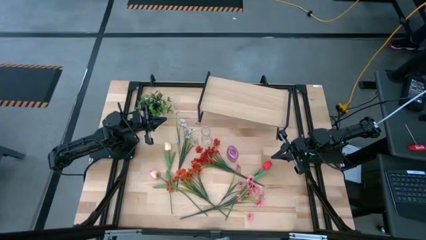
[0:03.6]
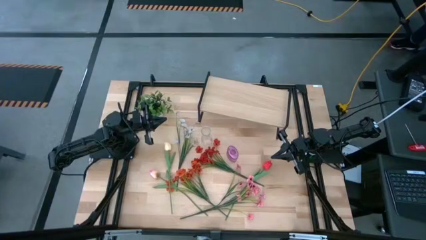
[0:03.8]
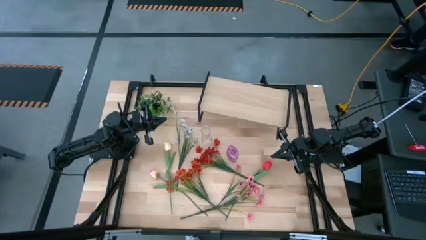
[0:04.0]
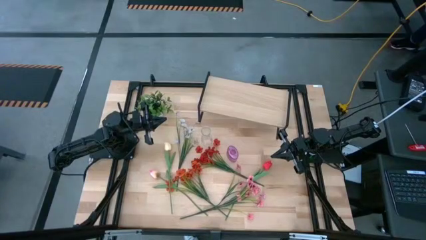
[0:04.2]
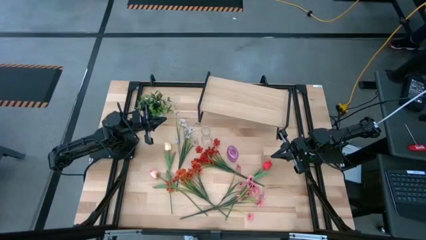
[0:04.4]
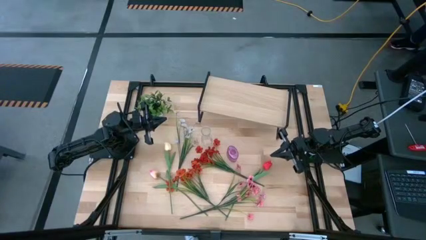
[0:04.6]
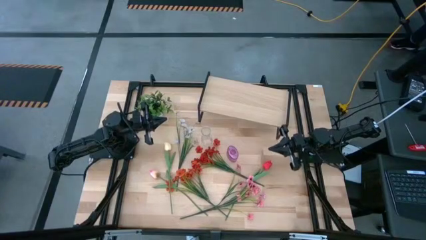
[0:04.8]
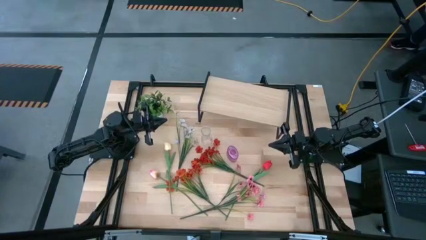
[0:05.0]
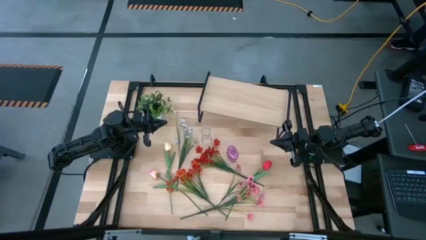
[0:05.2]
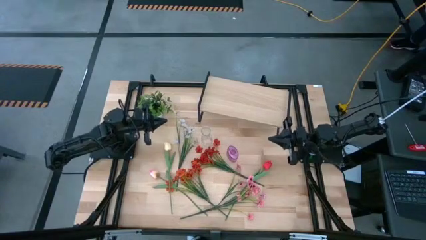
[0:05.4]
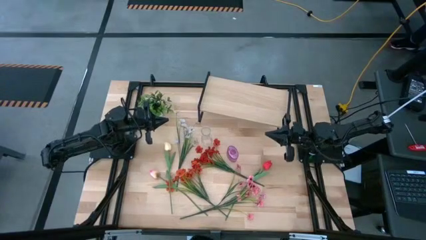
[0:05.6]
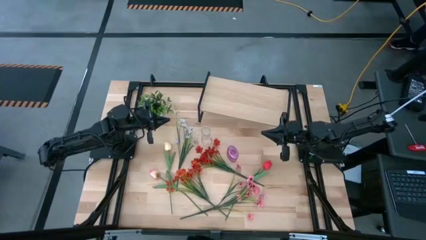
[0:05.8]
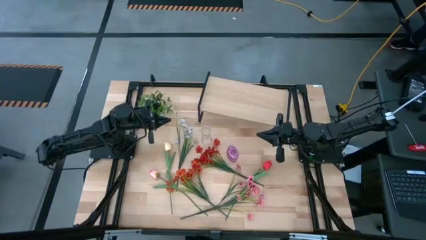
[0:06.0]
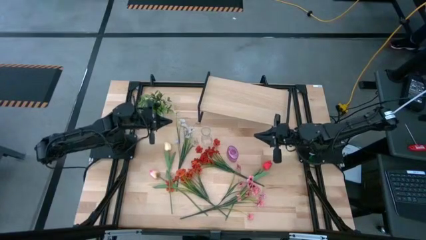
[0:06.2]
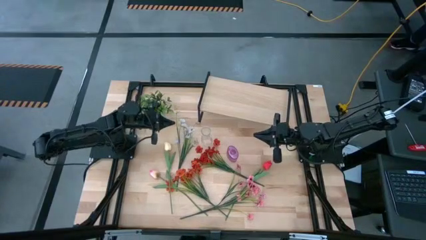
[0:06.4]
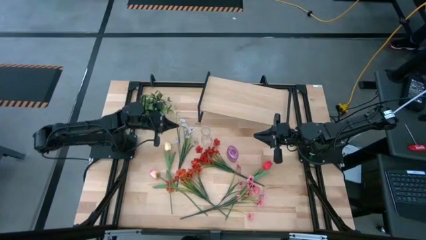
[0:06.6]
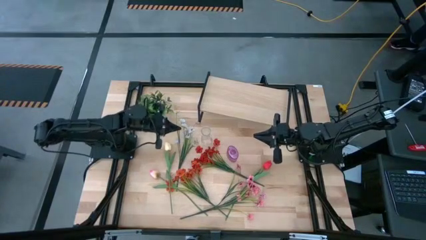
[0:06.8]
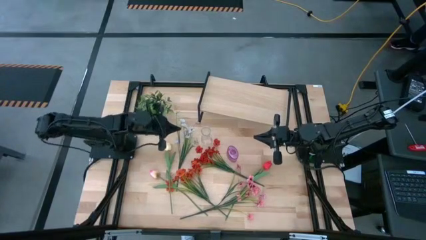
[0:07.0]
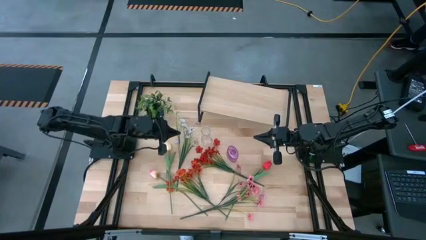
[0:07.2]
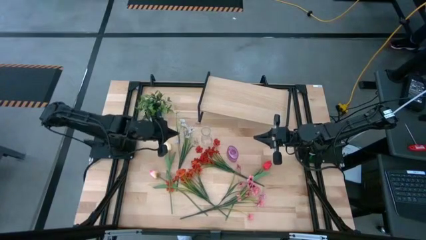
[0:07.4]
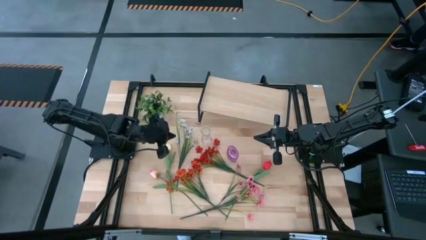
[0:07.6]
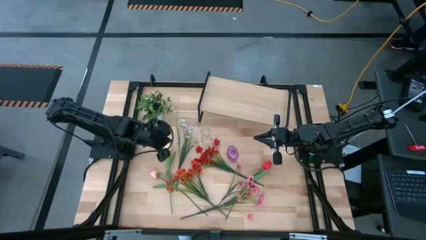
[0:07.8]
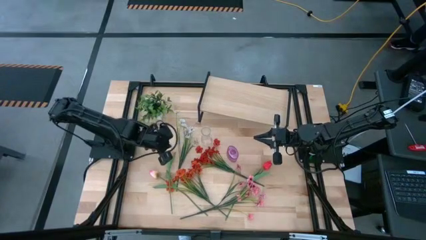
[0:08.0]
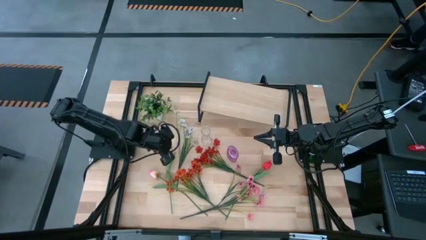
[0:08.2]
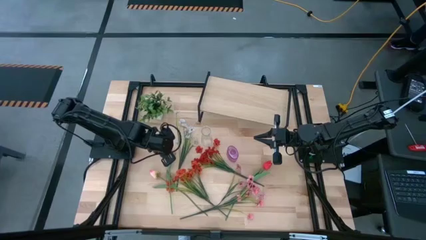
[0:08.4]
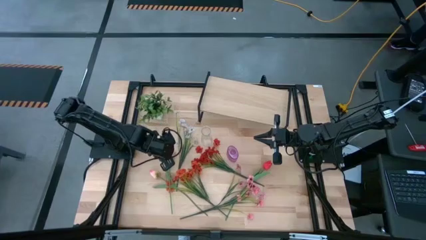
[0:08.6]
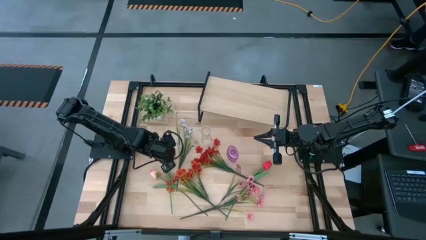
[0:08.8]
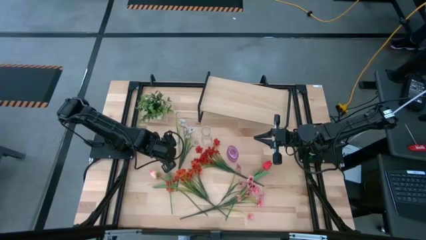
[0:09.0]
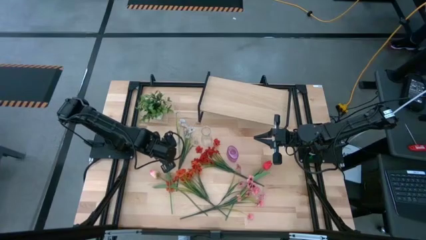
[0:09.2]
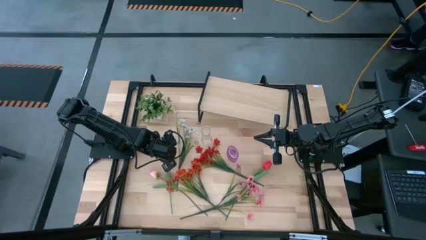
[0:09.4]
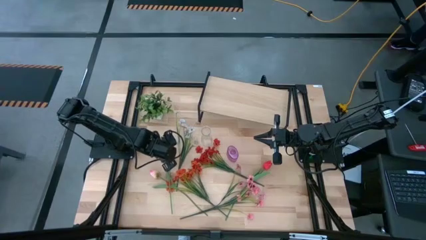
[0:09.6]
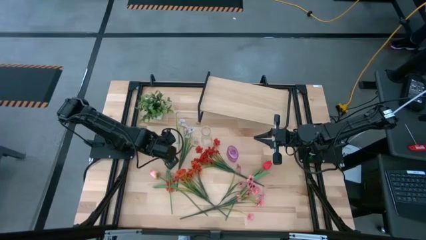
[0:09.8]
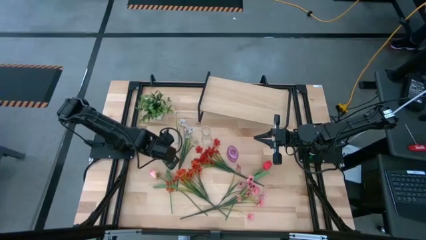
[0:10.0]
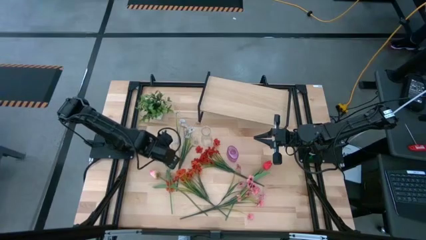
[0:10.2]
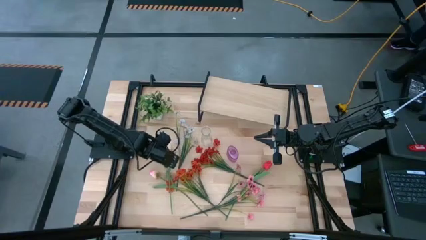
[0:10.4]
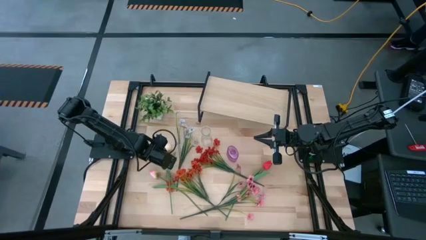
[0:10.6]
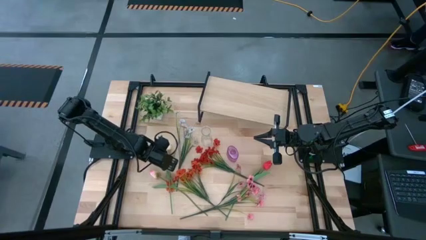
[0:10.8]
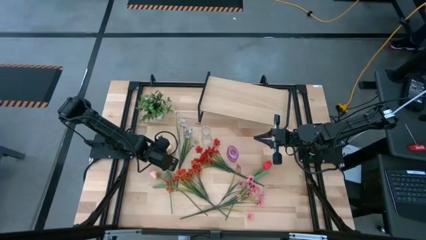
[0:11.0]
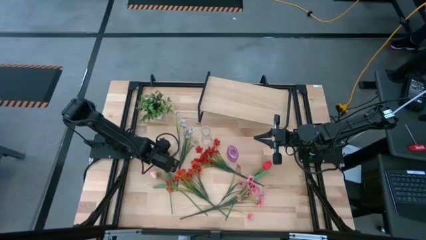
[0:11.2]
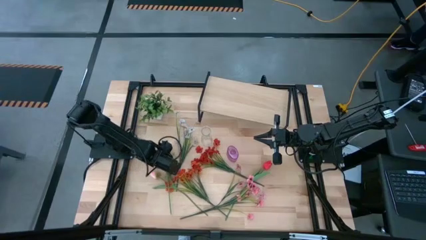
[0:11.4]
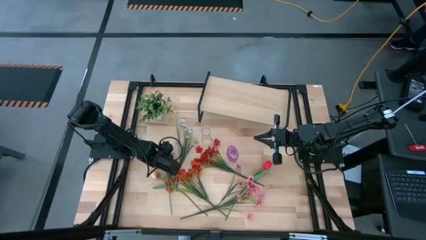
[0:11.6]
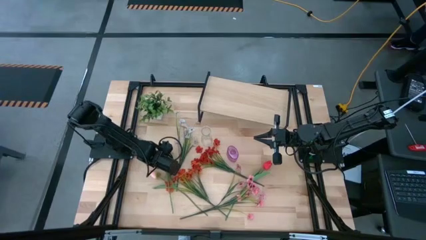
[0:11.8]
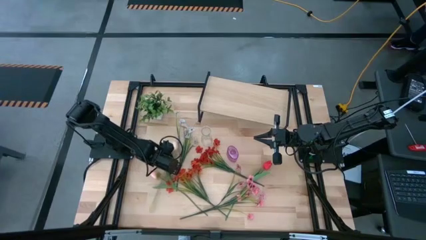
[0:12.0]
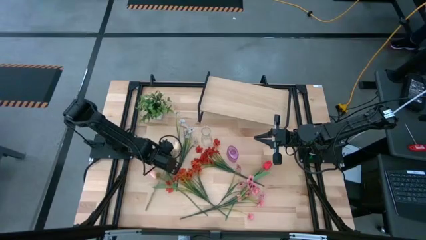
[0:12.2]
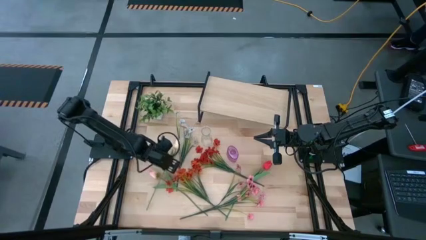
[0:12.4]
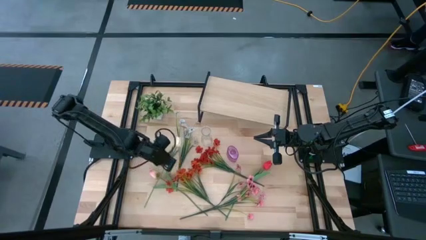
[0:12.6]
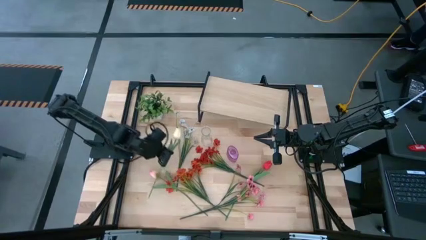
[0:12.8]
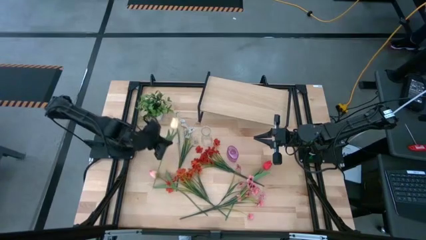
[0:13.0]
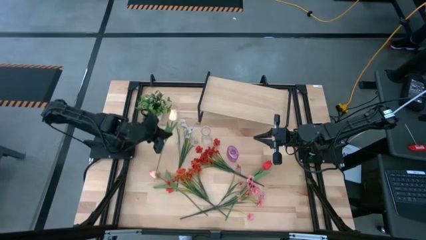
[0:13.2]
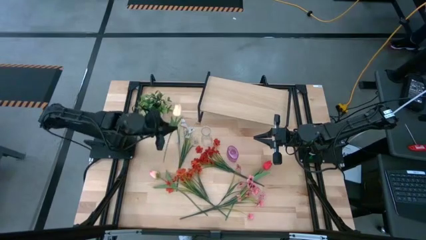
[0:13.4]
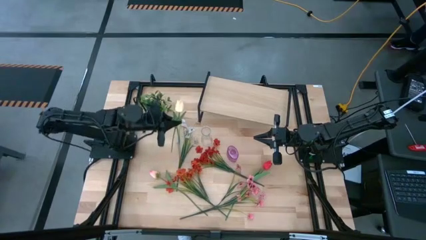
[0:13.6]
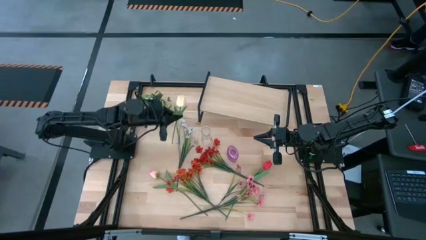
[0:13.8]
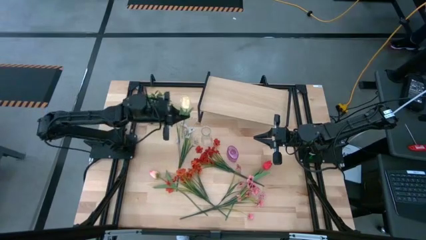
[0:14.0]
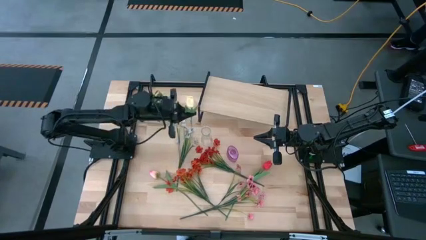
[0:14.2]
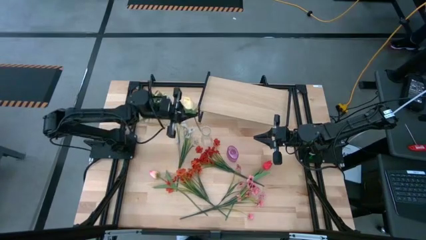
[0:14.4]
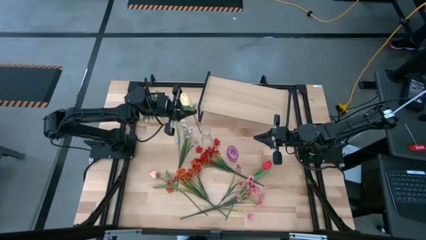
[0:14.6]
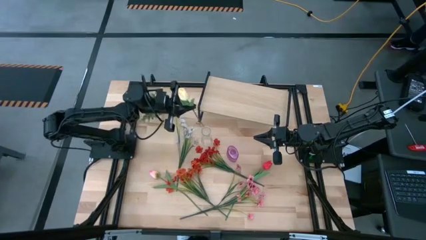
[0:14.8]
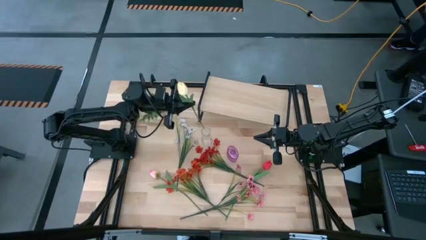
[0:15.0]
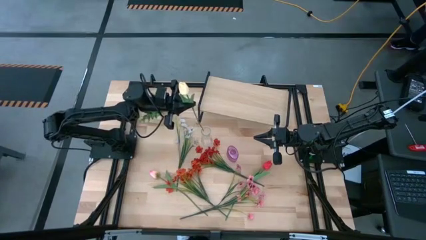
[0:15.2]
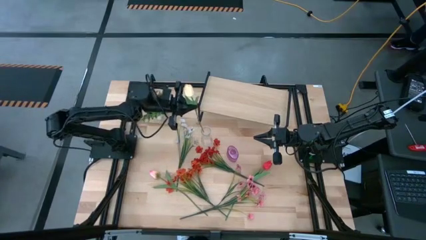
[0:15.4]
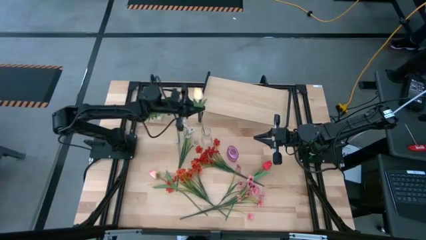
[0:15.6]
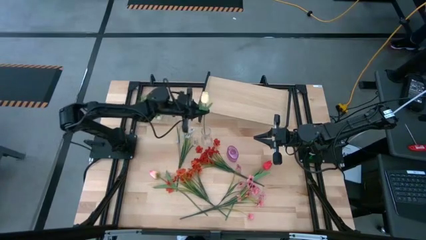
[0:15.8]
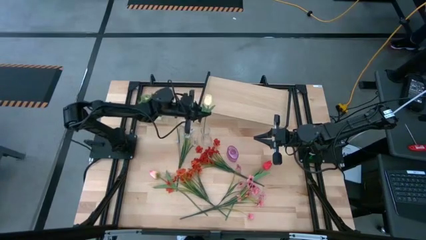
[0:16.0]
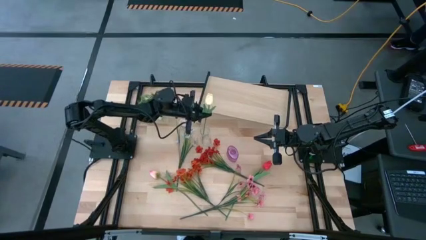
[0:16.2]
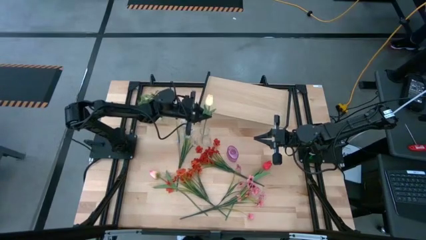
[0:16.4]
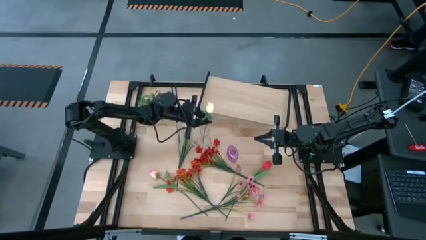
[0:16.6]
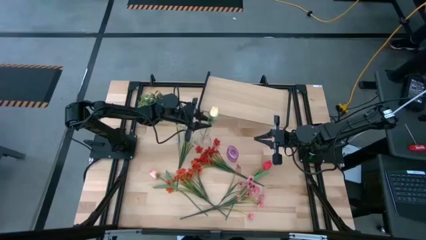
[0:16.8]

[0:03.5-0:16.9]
Task: Pick and place flowers into a vace then onto a shelf
Put the yellow tulip into the transparent vase
